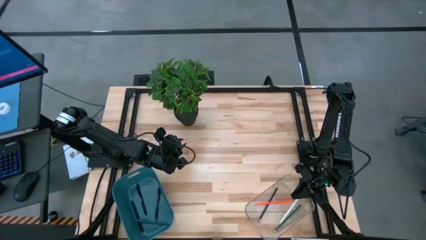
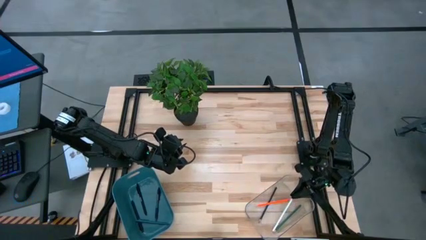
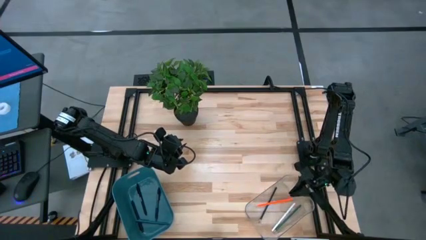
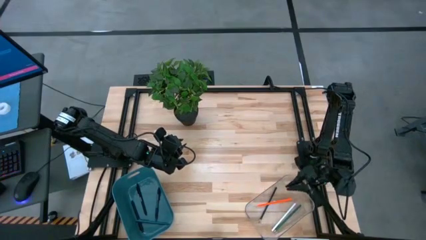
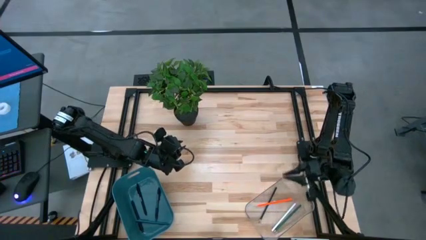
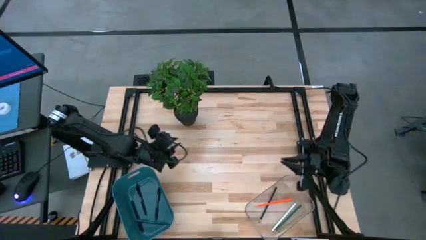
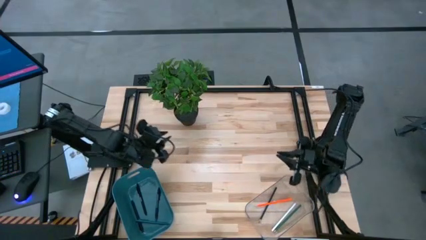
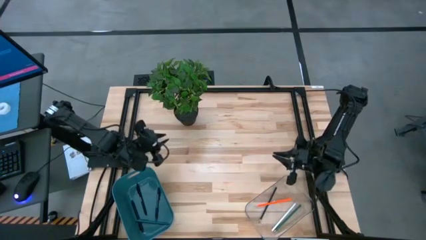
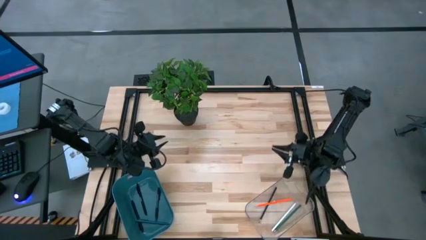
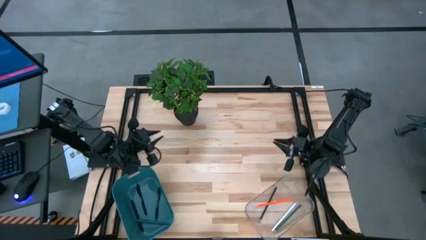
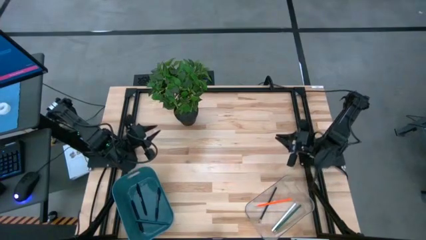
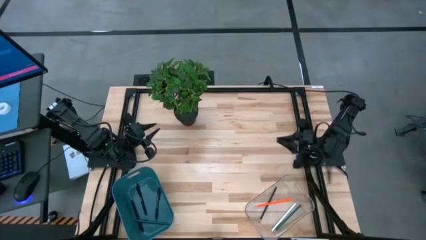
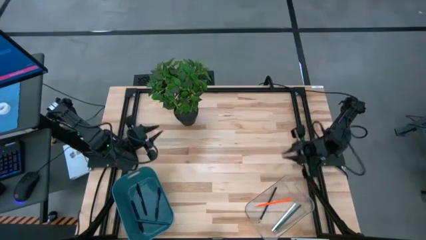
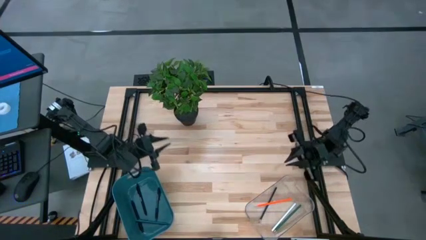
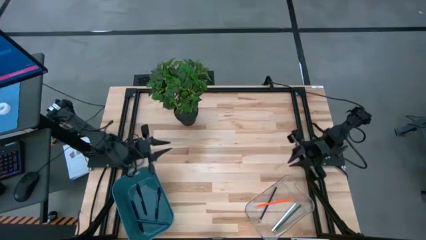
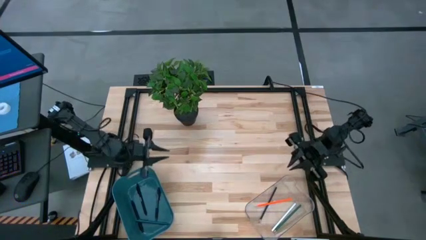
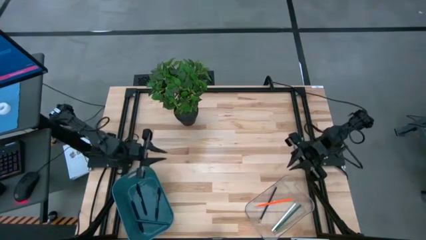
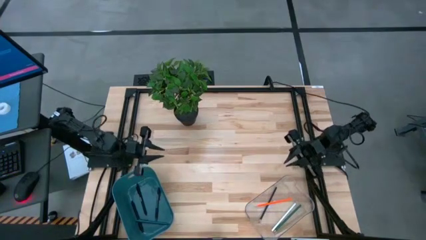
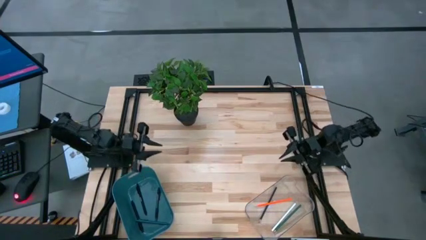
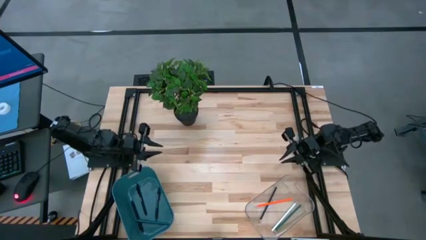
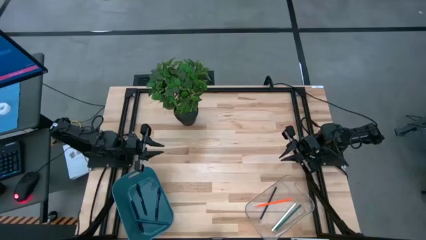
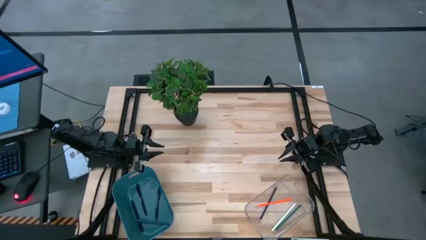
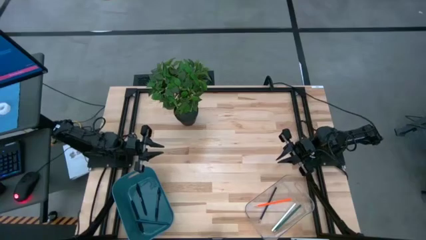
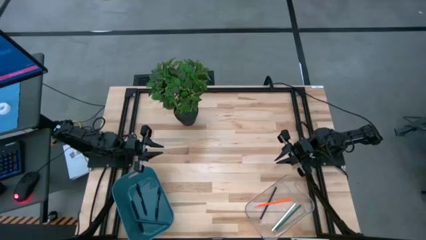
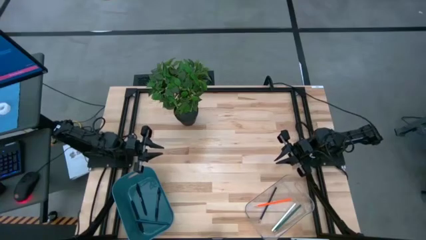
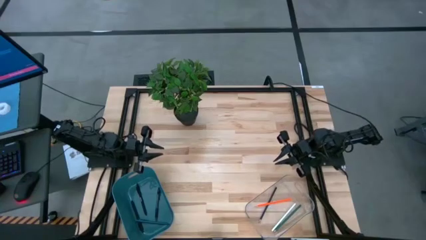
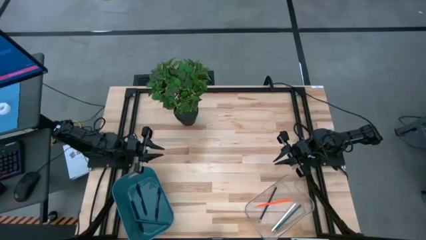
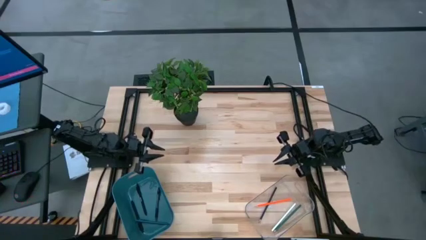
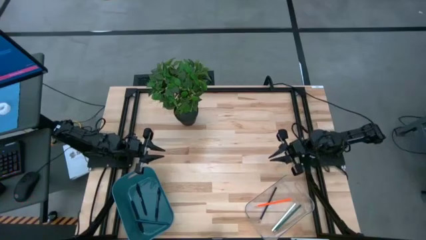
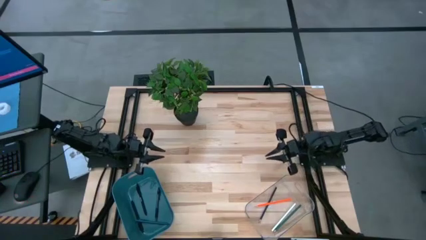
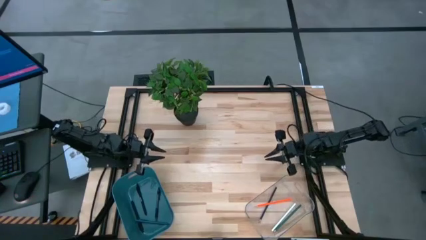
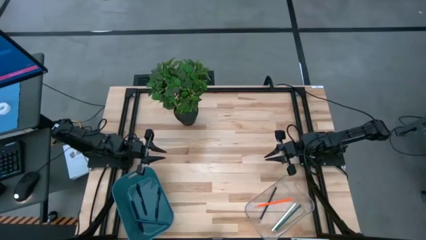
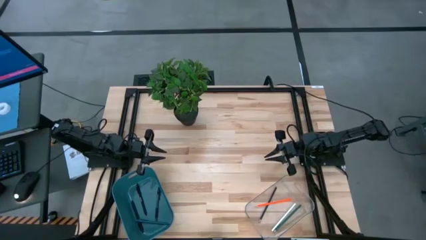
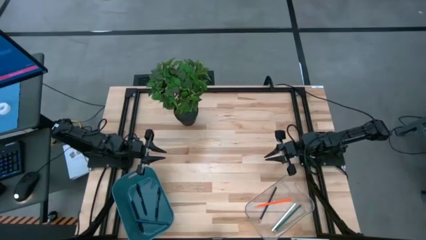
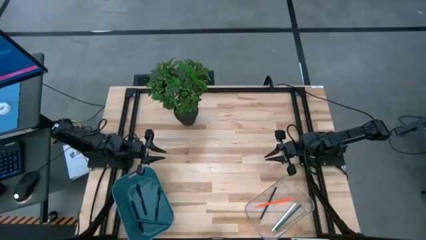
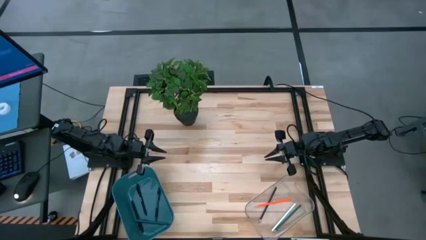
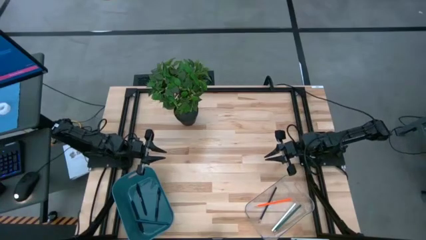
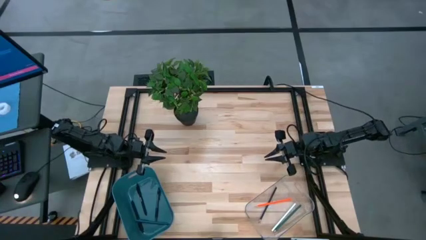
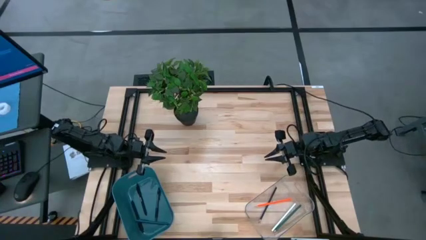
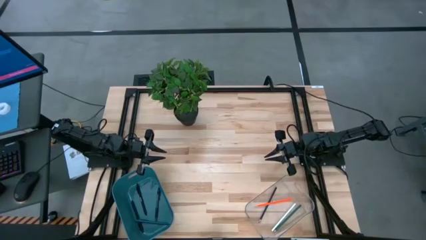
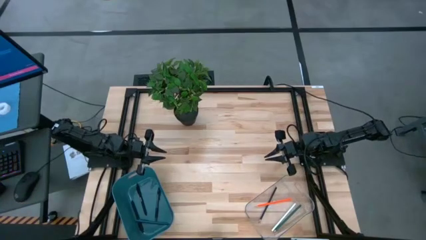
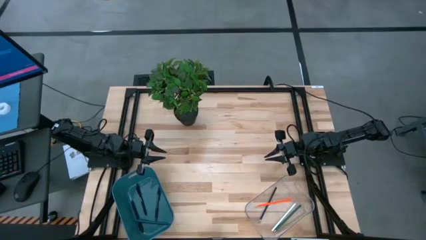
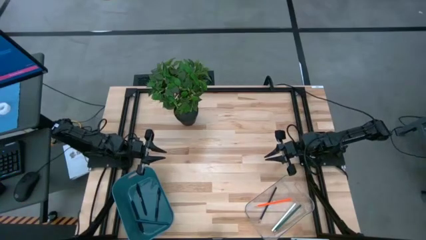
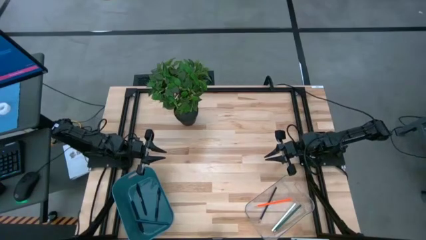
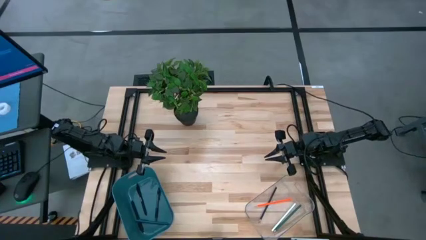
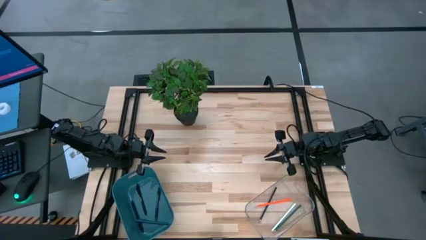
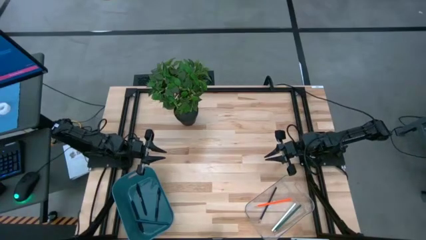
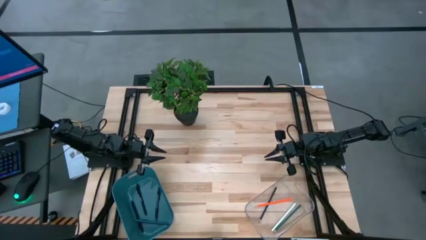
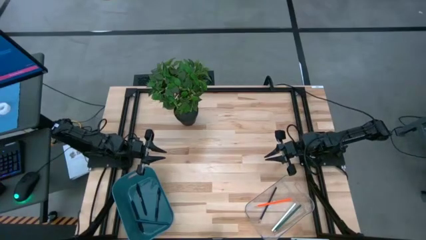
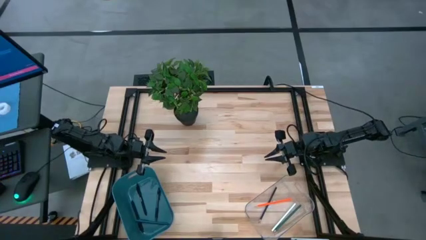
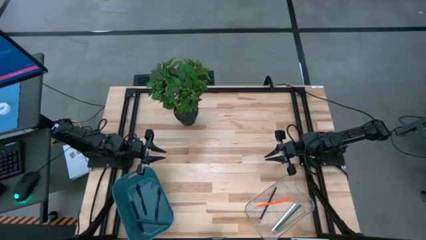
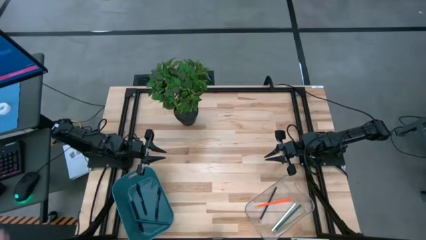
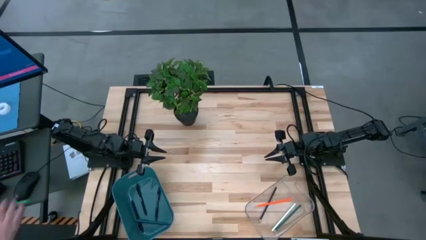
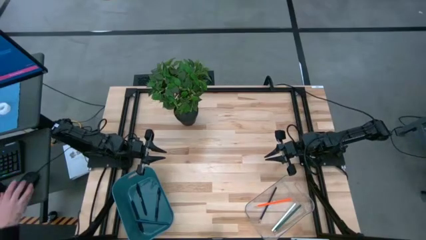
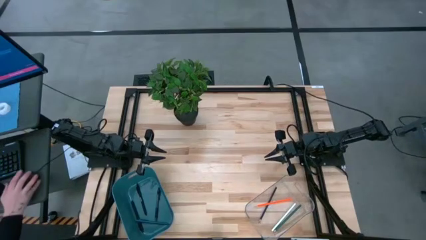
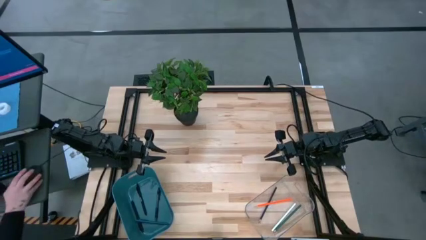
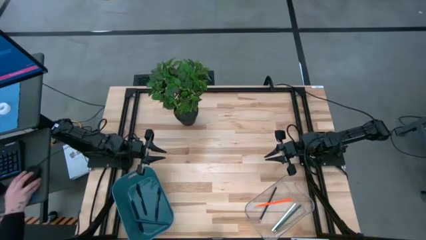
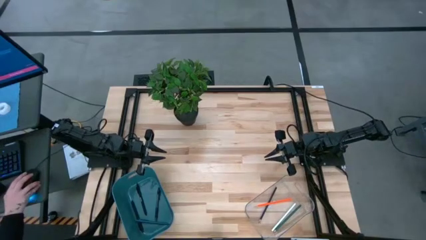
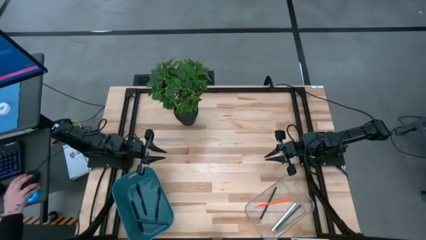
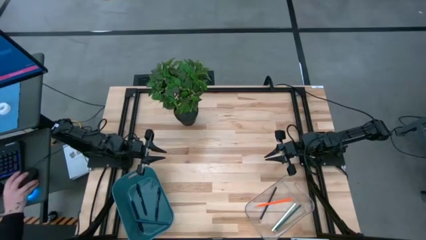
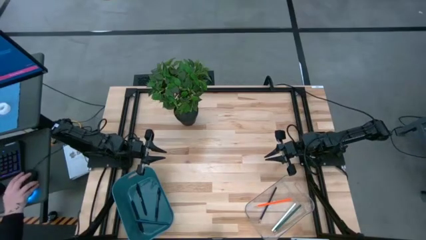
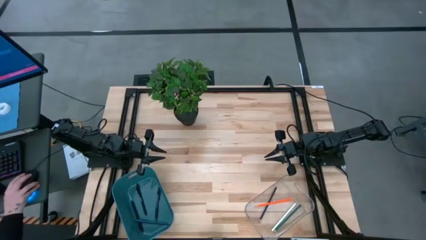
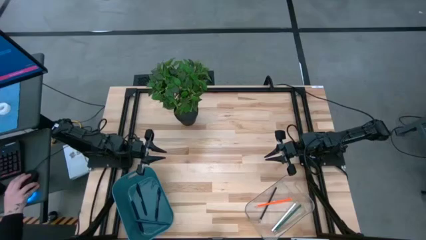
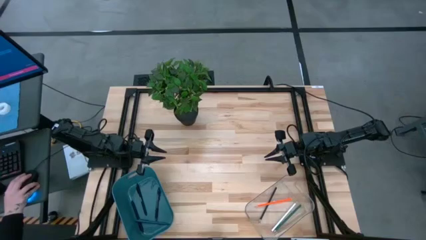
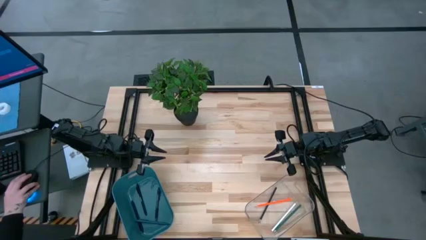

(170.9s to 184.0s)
Task: Sort pens & pencils
Return to Home Position

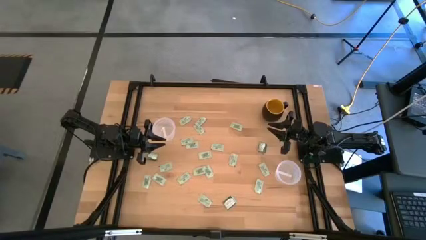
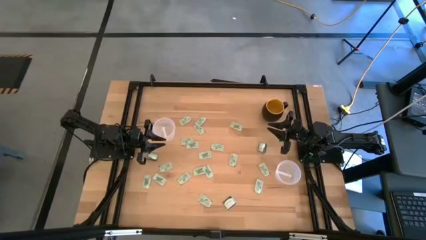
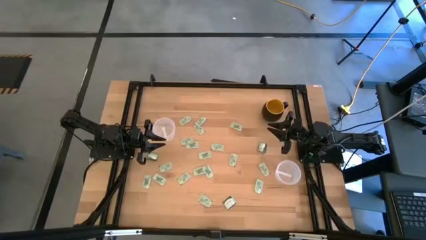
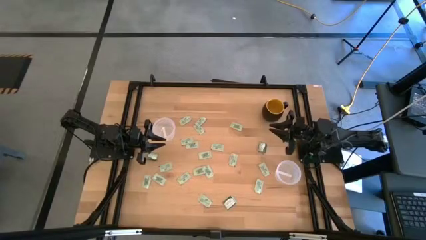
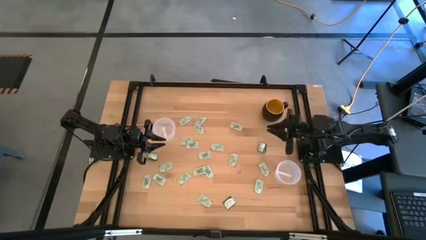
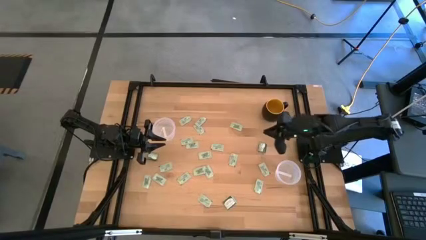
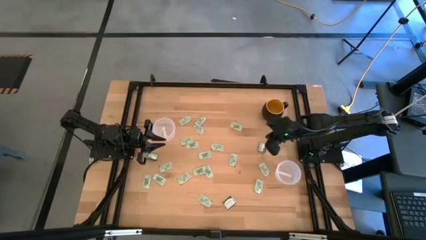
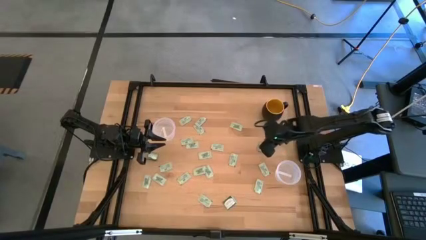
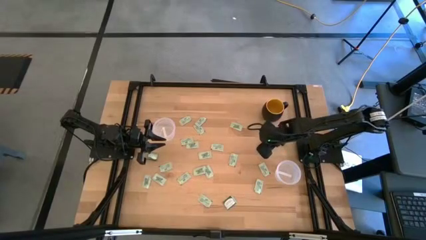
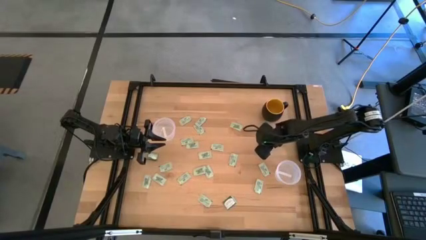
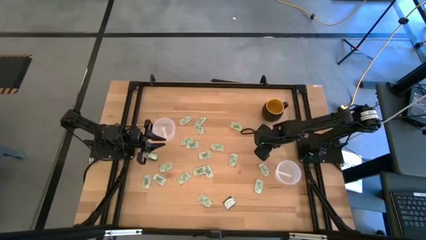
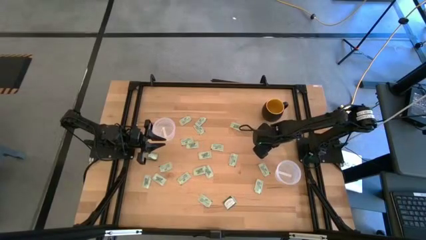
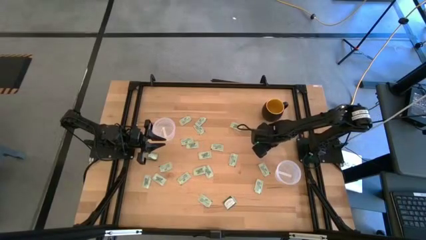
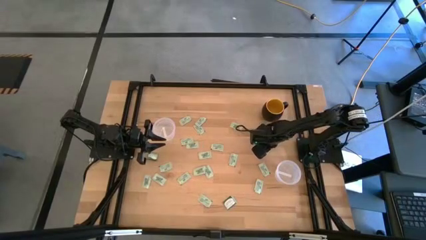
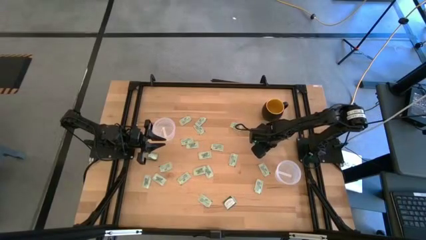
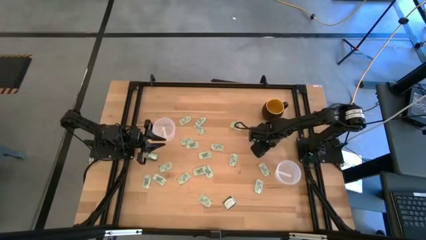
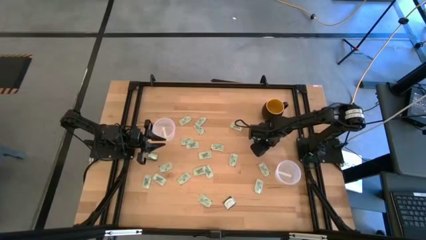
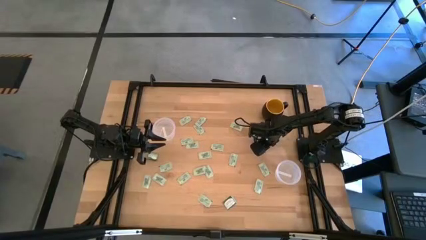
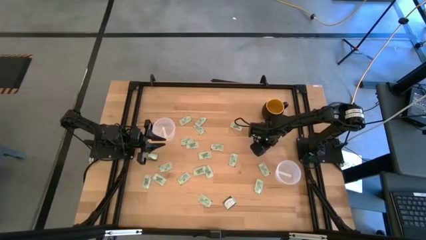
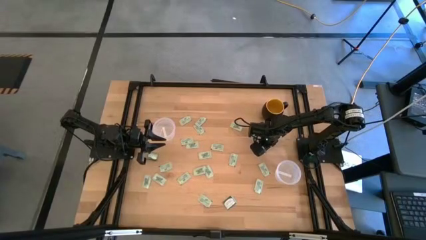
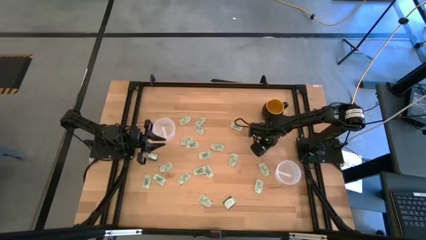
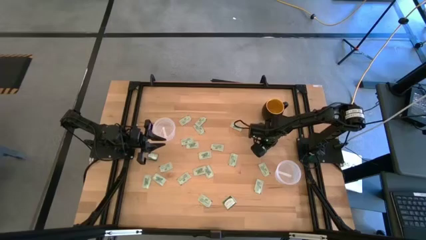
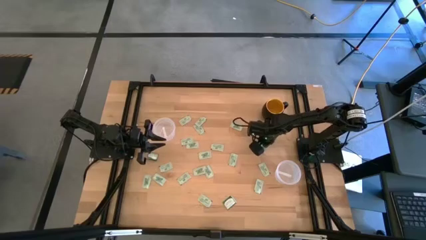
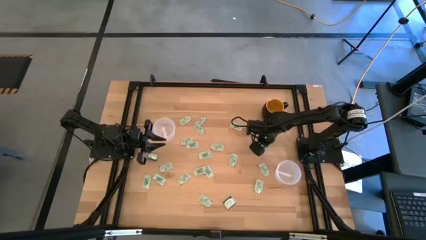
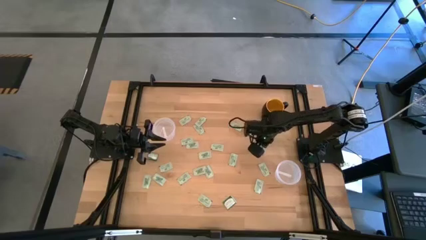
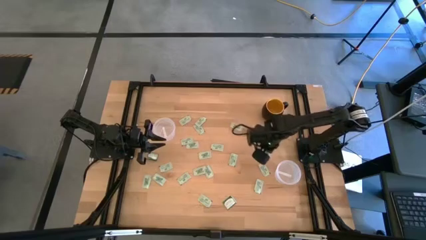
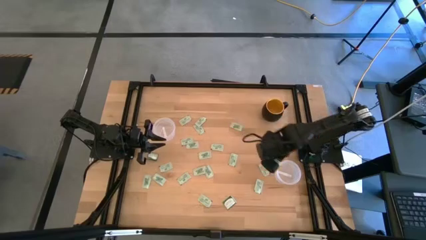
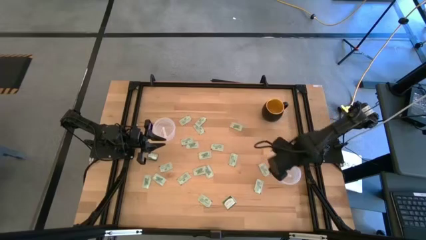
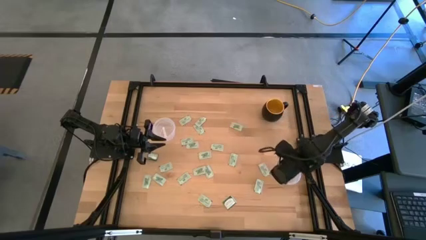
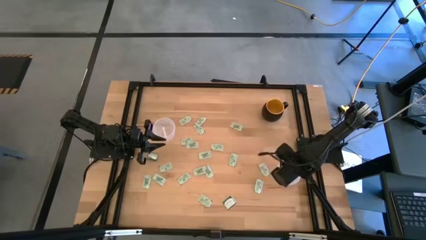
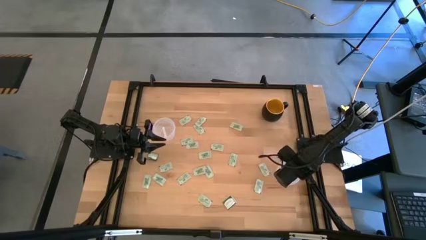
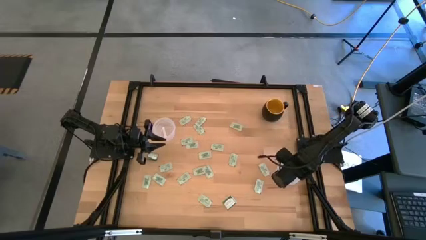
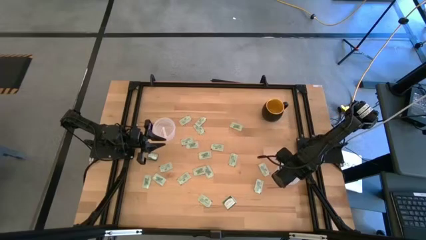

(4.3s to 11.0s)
Task: Pick and place Stevia / Truvia into bins
Put the green stevia packet into the right transparent container
